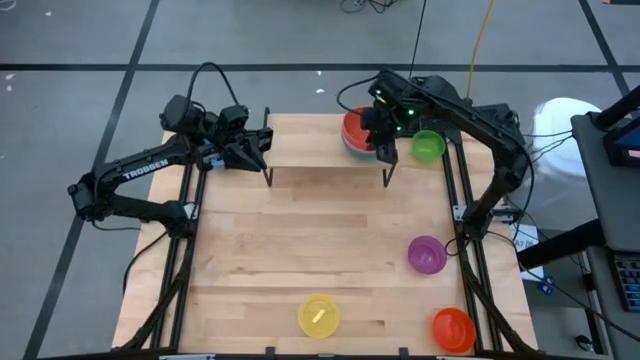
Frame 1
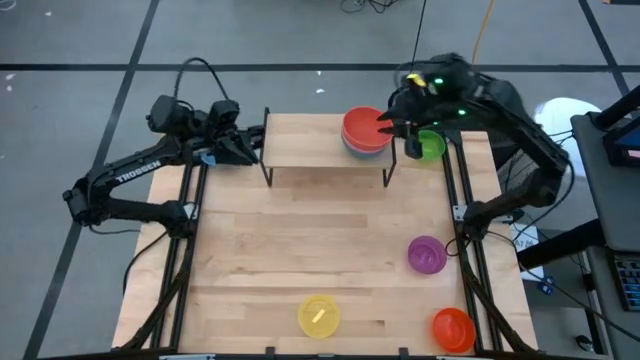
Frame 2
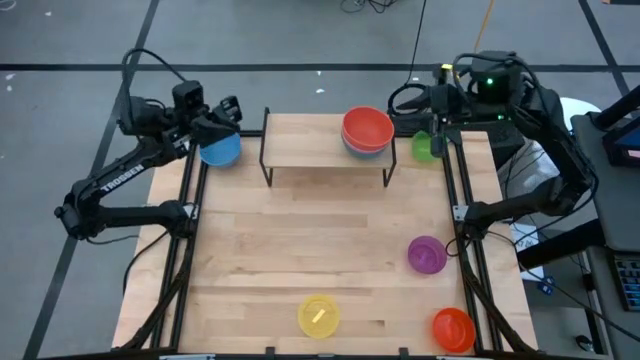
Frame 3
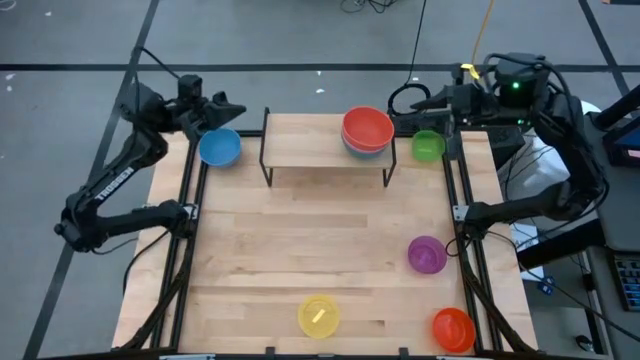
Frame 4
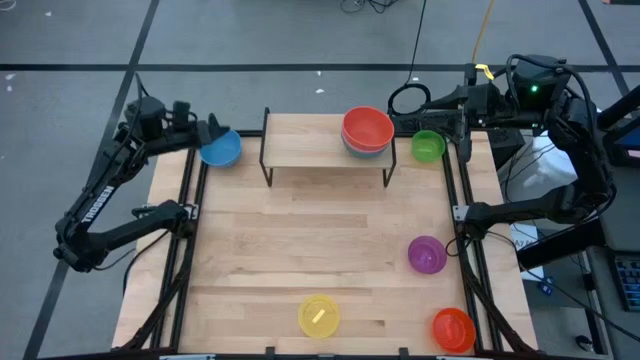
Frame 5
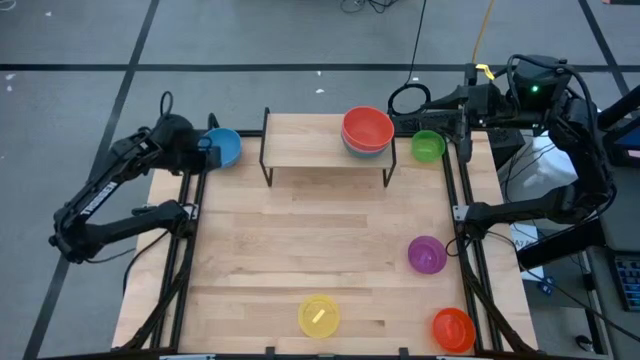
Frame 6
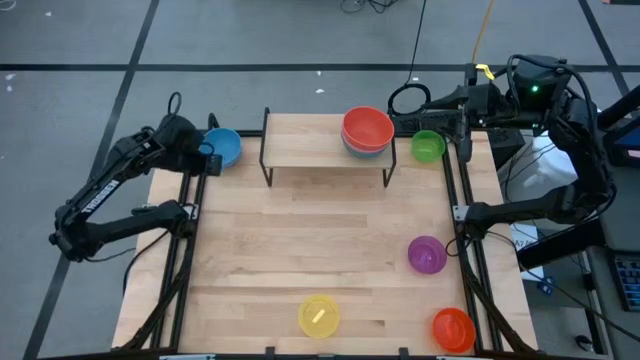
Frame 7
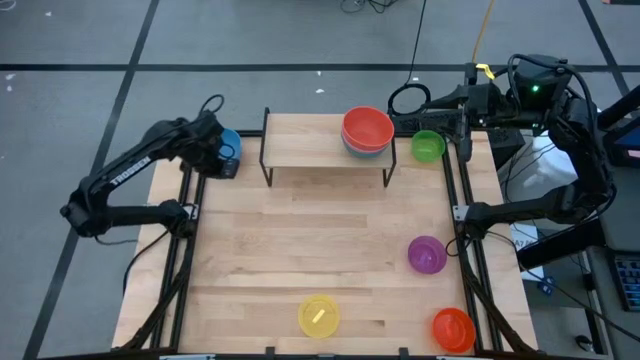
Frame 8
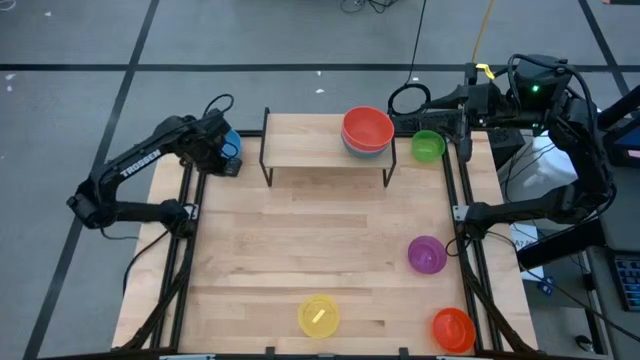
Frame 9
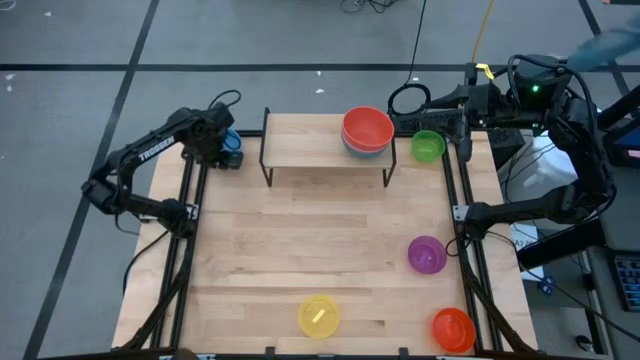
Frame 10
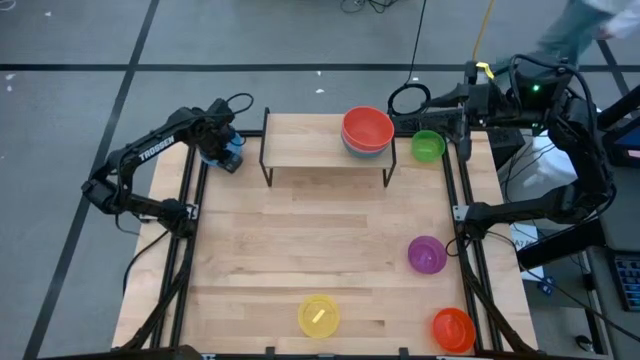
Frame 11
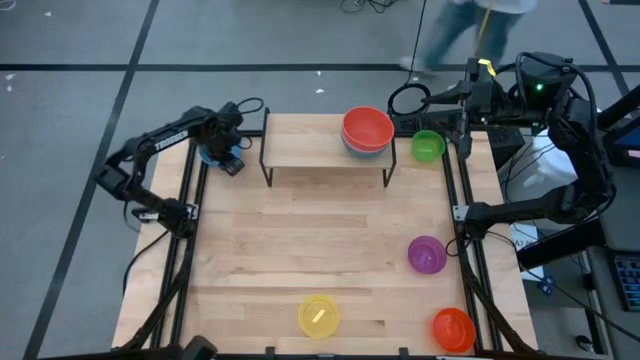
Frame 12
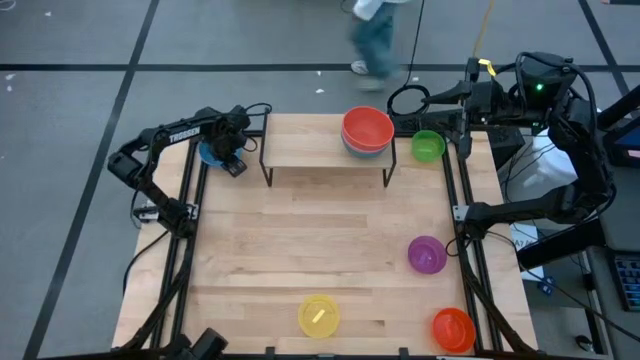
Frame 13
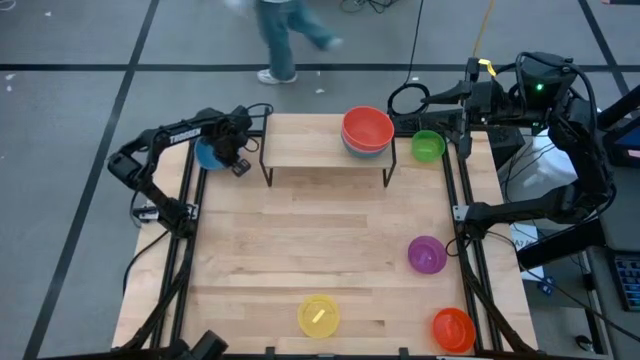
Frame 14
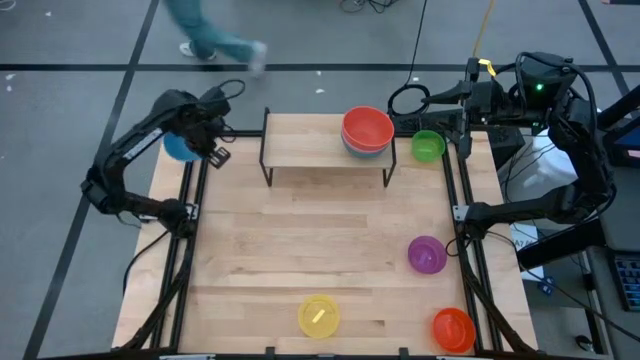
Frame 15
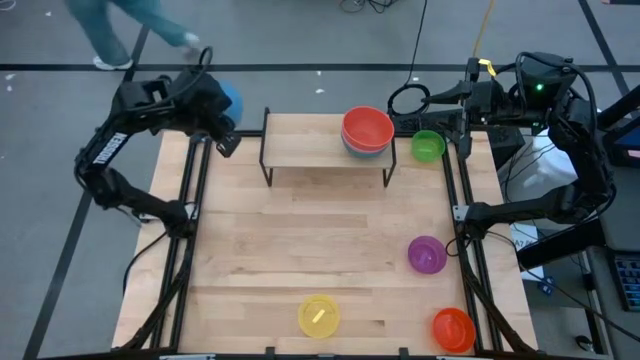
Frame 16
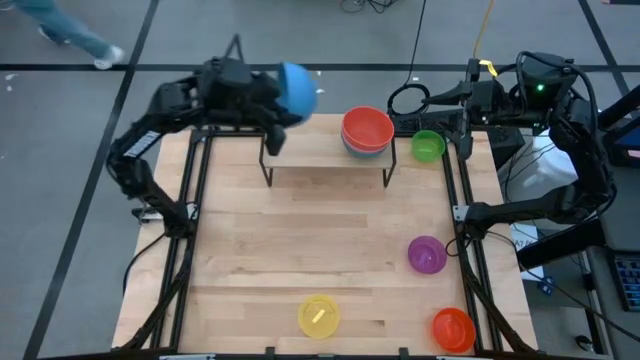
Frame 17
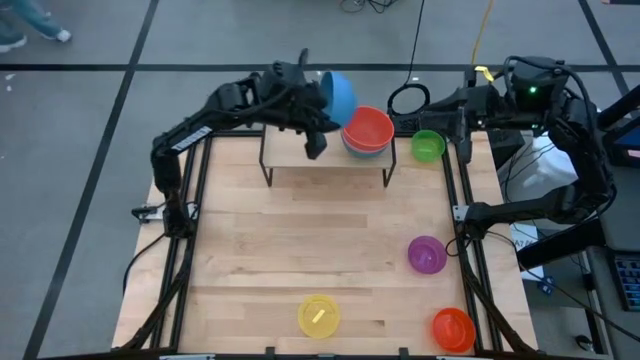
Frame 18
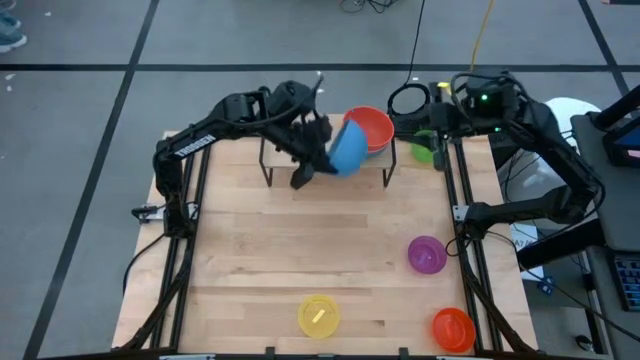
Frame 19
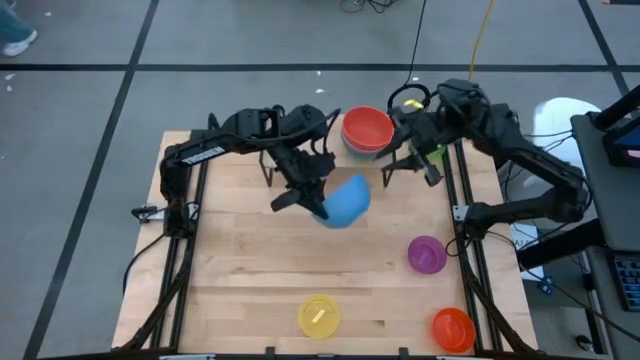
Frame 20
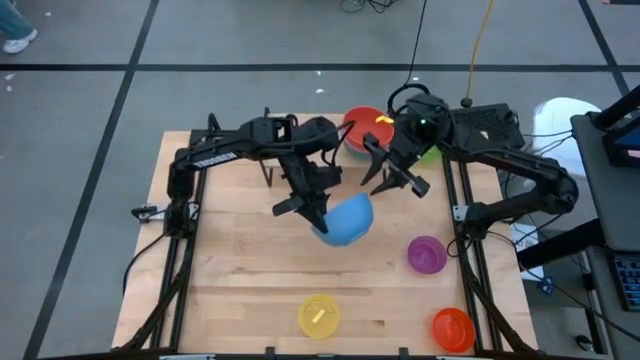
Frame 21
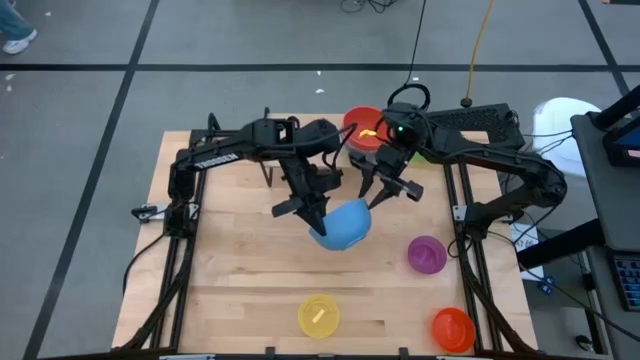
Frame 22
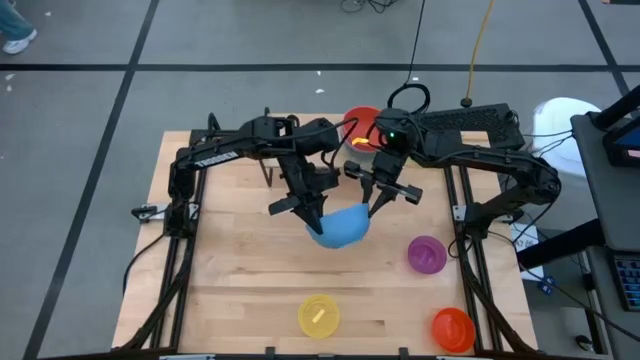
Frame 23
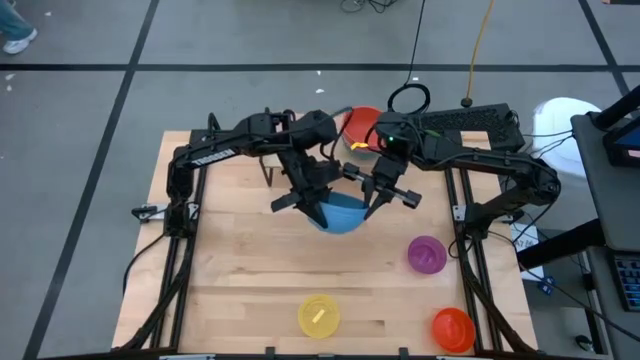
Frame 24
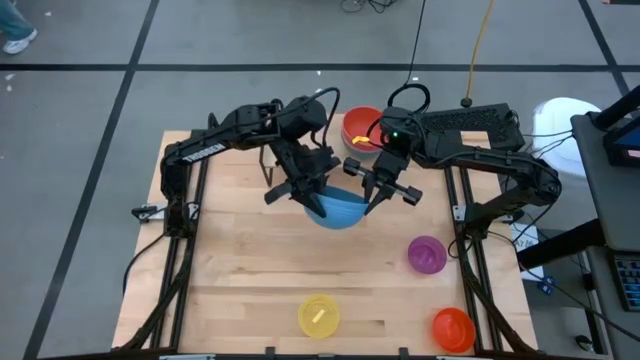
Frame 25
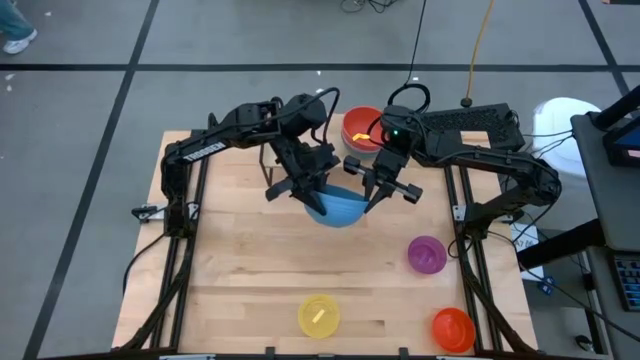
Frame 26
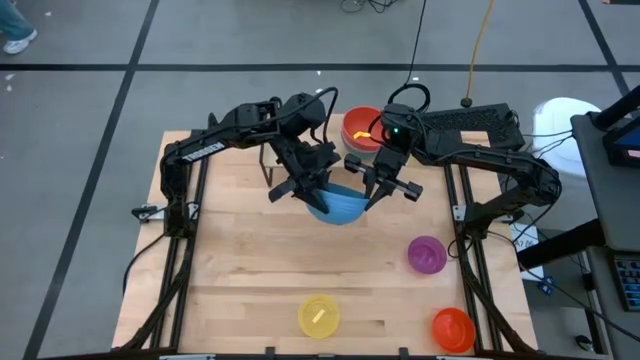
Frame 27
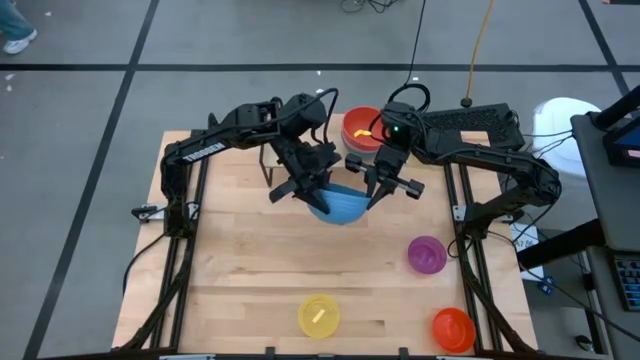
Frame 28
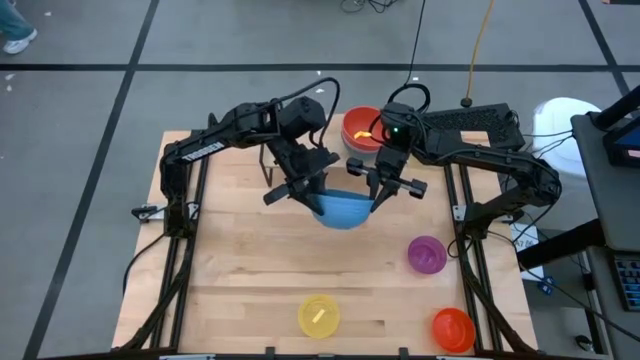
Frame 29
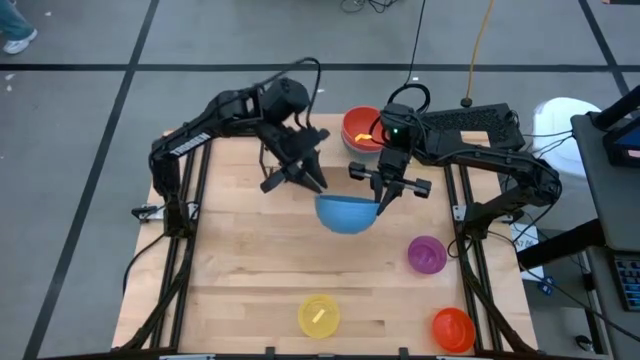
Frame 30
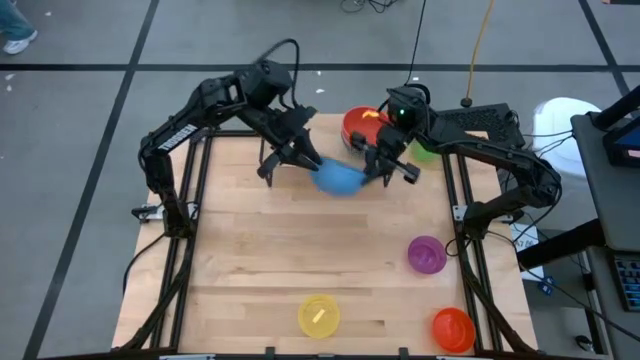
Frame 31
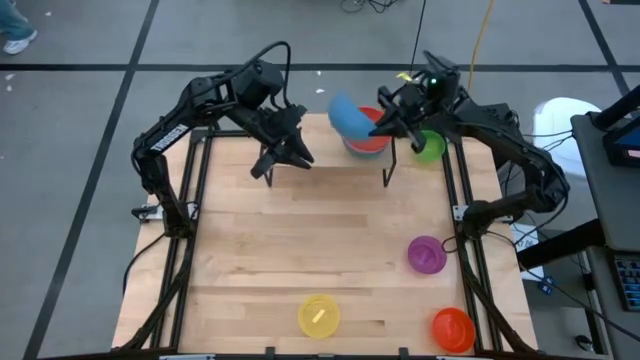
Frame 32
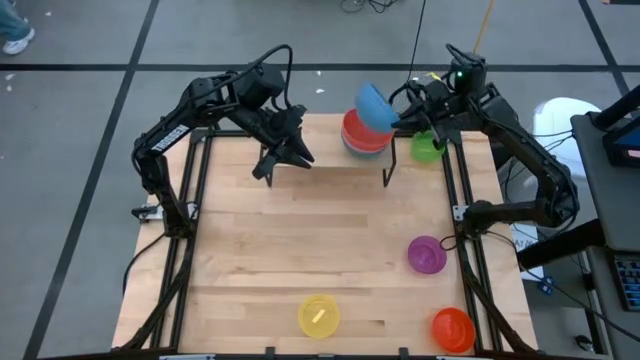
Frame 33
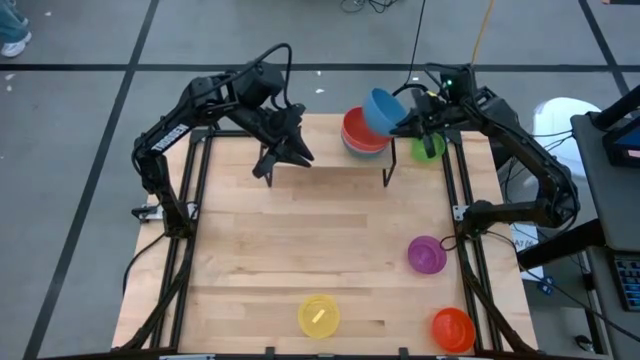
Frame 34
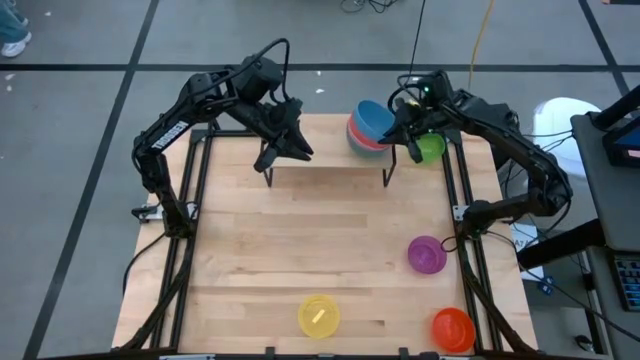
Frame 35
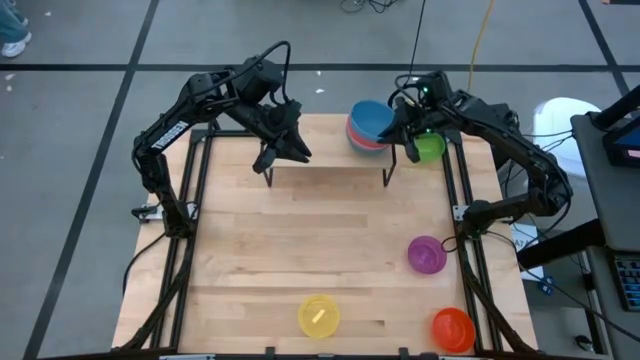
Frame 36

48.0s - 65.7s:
Task: Place and stack bowls onto a shelf
Stack the blue bowl on top of the orange bowl on the shelf
